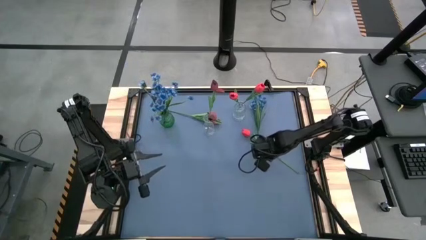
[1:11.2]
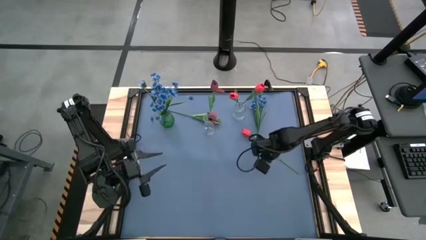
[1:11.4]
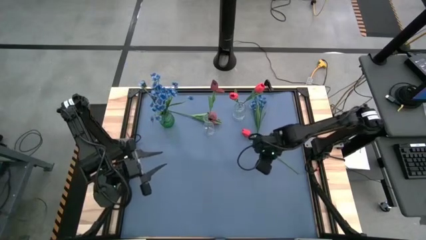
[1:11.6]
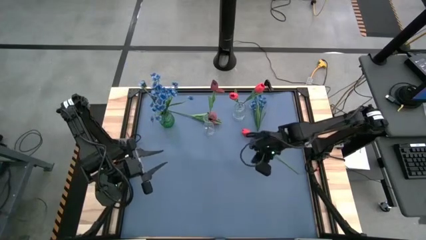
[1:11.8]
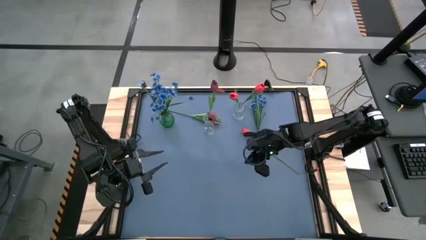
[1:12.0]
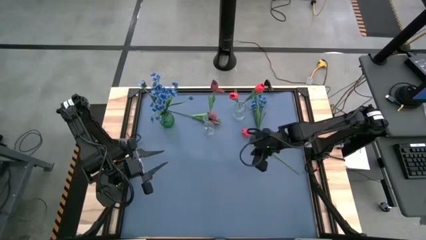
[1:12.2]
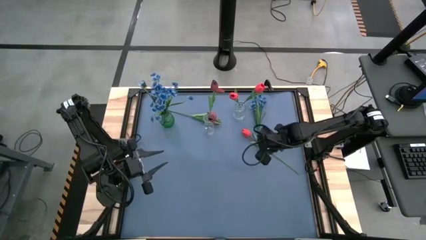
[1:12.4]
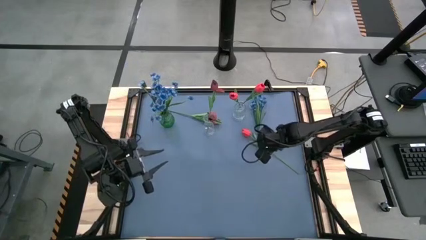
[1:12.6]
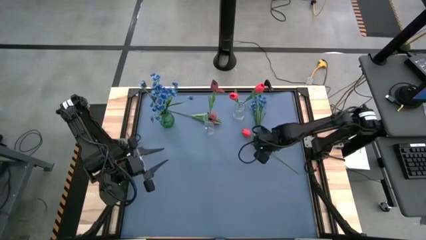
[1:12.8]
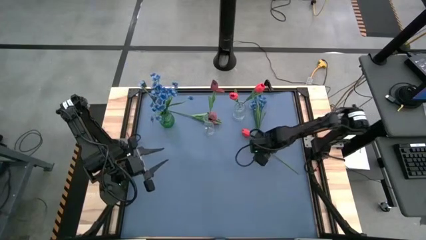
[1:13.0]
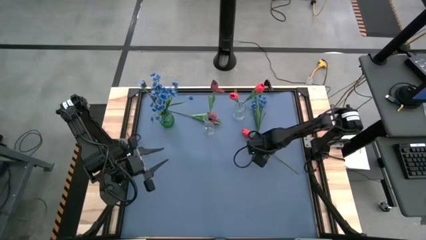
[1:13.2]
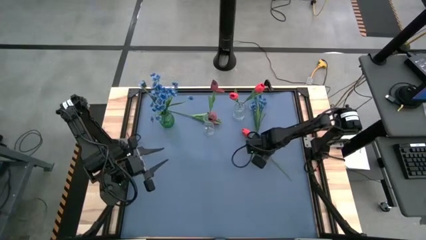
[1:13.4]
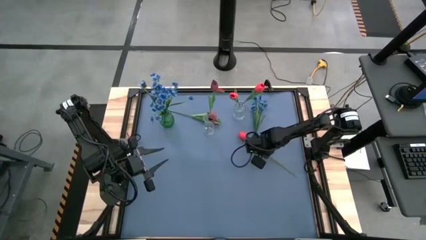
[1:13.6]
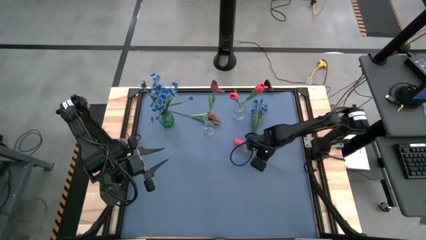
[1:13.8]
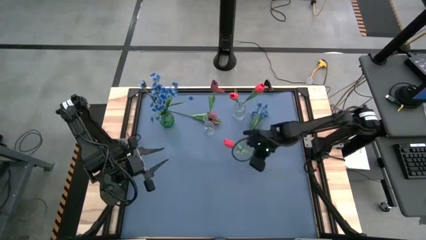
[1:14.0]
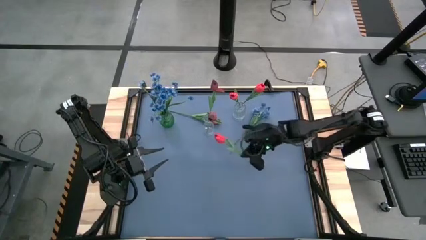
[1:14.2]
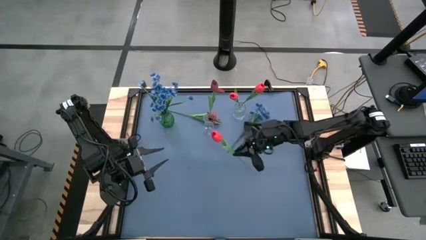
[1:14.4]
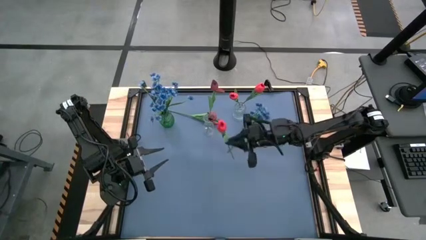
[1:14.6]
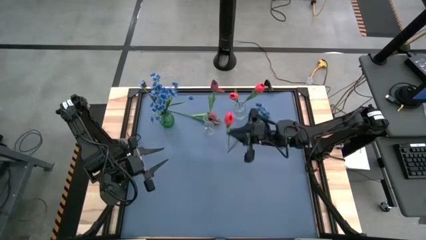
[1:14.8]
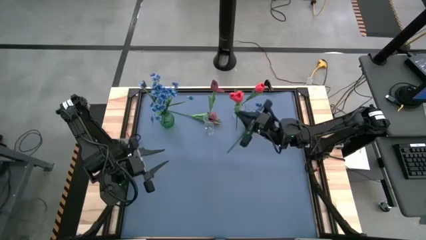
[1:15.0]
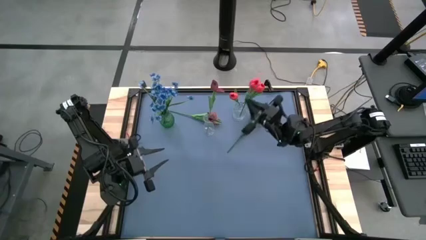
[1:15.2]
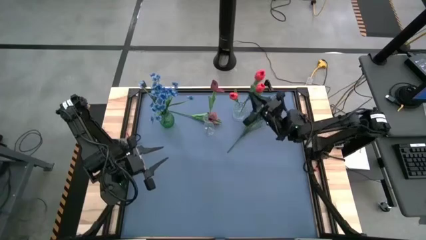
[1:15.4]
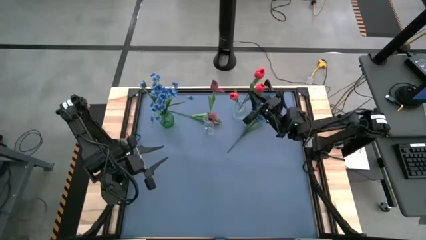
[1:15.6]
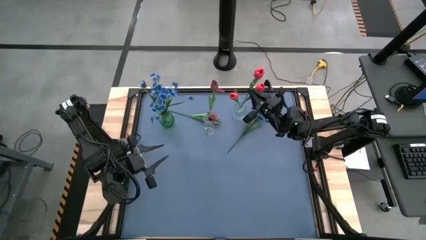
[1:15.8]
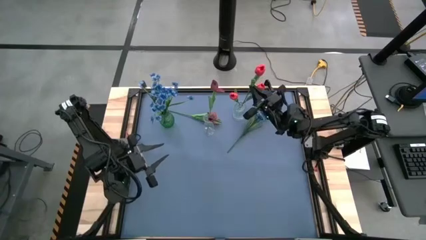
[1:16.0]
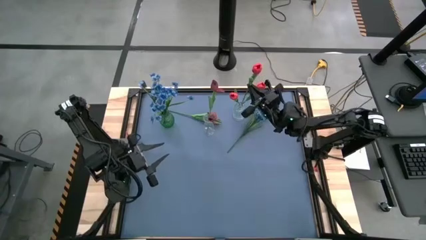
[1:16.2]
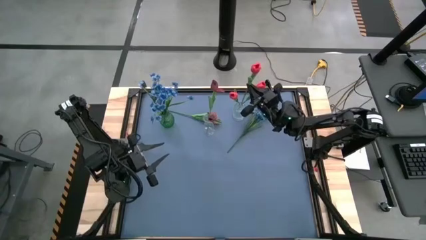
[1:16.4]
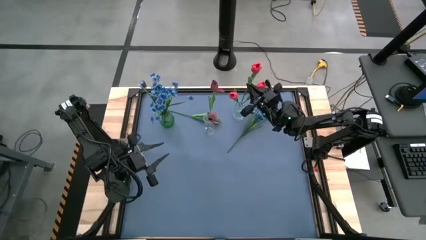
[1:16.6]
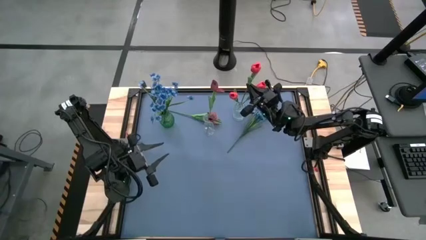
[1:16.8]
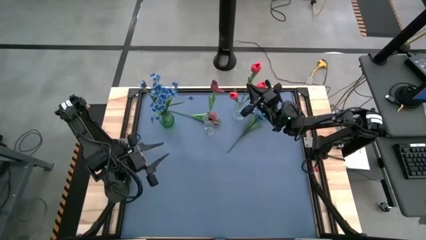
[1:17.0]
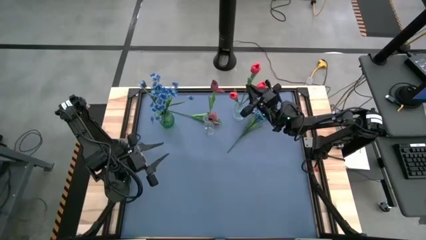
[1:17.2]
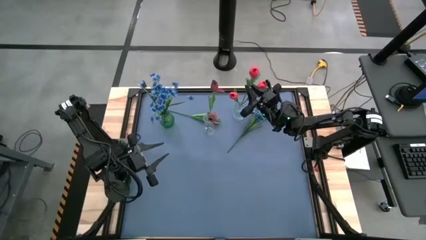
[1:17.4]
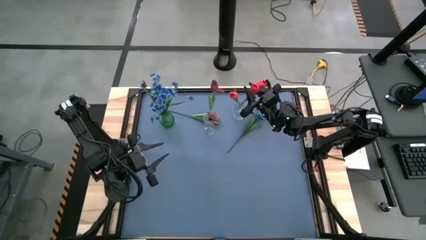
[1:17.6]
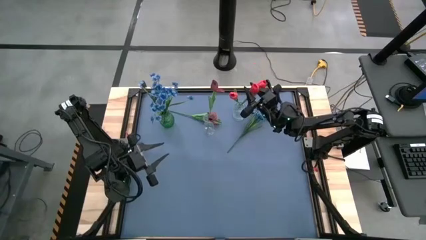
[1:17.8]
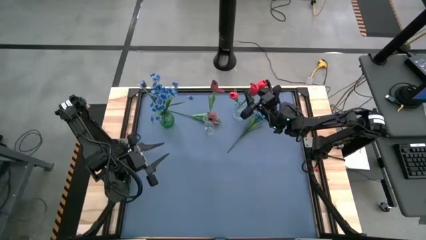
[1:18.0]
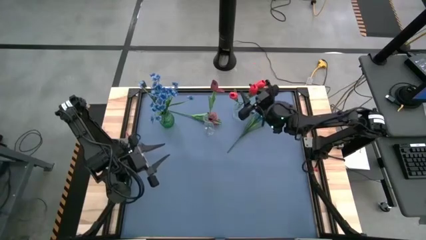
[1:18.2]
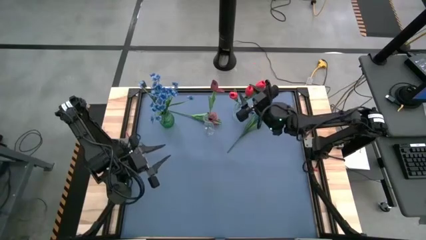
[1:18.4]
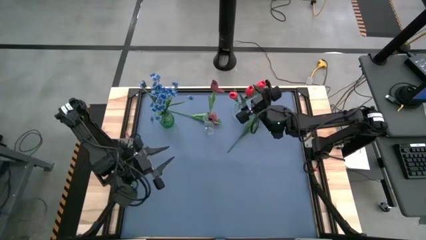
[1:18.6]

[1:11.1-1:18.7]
Task: Sort flowers into vase by color
Put the red tulip into the top transparent vase

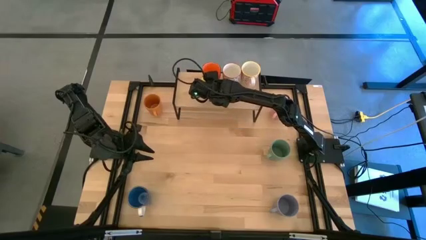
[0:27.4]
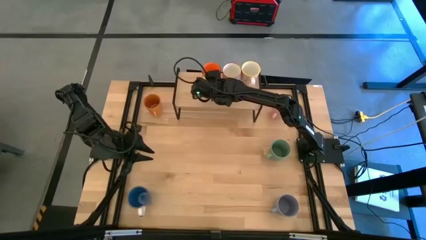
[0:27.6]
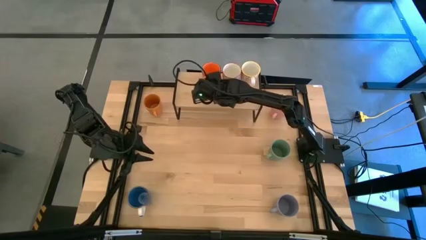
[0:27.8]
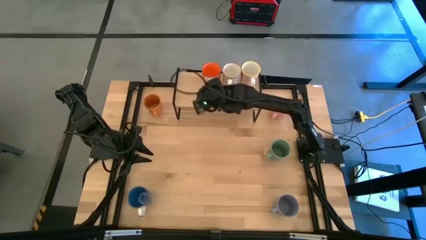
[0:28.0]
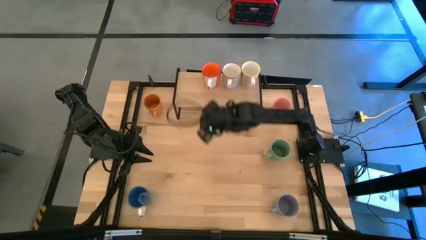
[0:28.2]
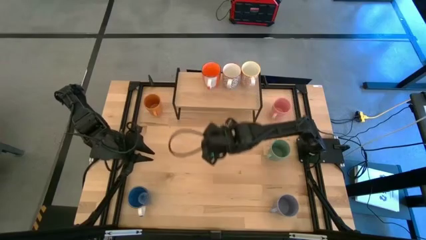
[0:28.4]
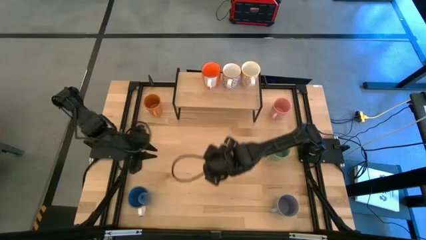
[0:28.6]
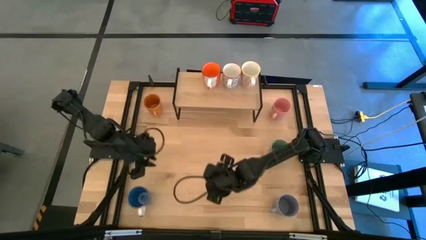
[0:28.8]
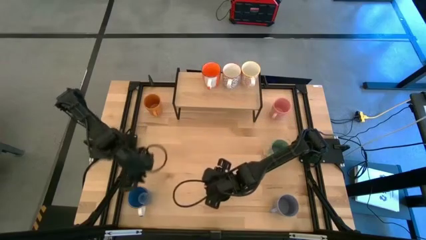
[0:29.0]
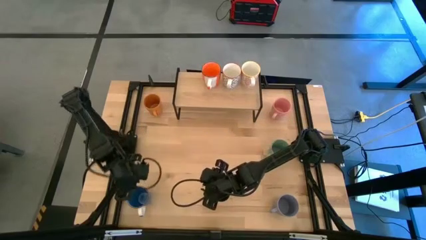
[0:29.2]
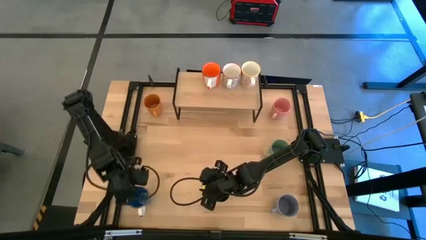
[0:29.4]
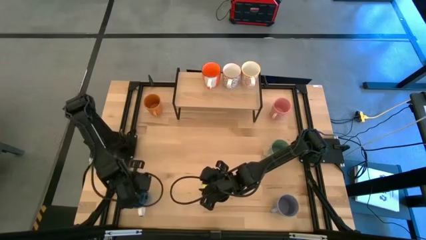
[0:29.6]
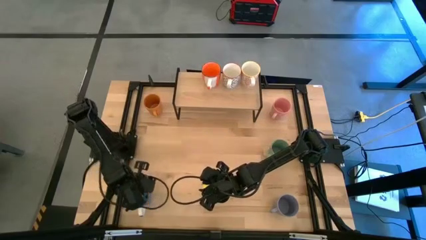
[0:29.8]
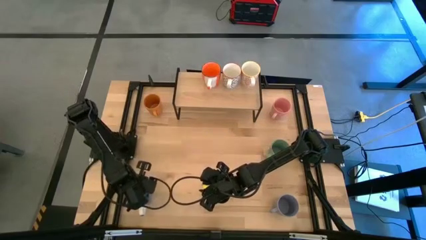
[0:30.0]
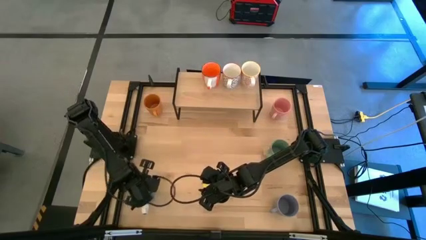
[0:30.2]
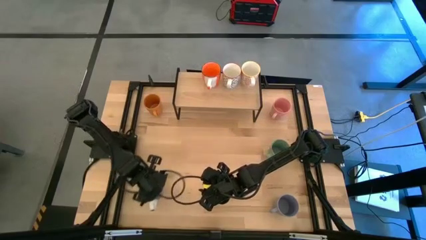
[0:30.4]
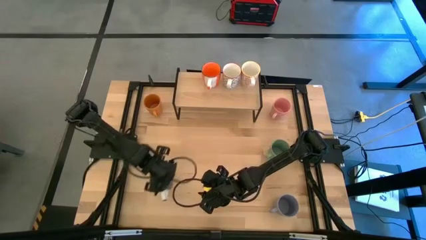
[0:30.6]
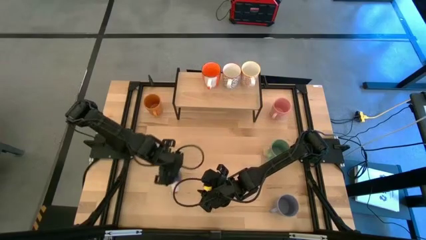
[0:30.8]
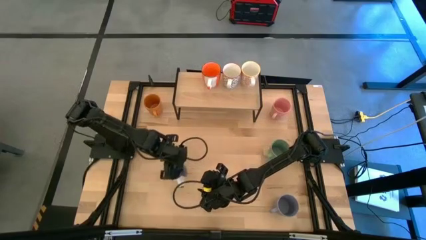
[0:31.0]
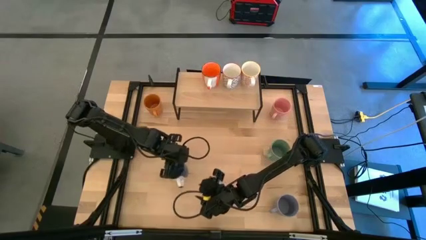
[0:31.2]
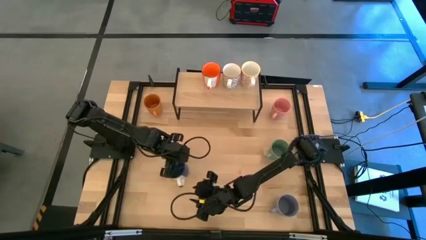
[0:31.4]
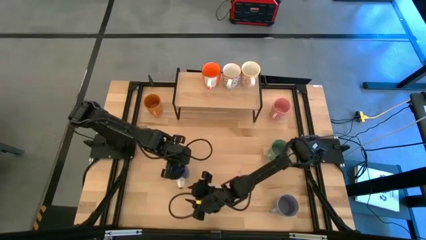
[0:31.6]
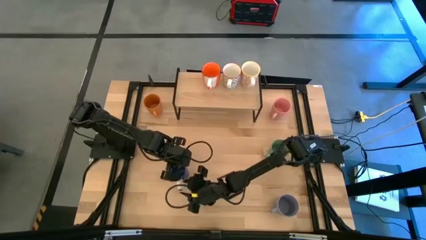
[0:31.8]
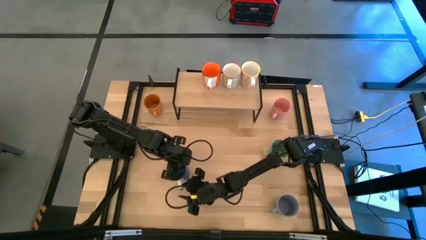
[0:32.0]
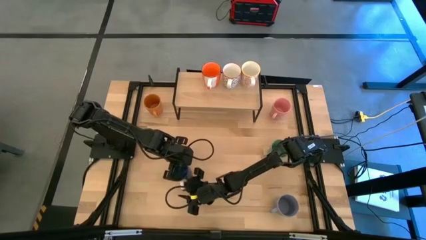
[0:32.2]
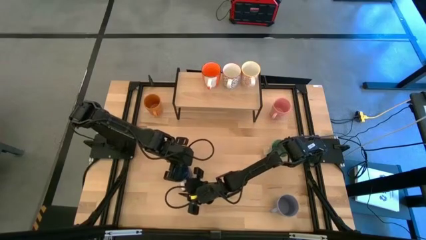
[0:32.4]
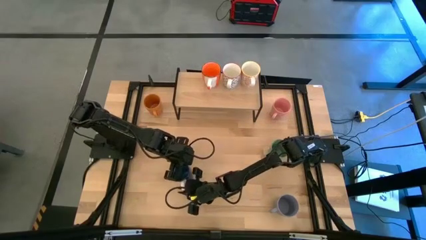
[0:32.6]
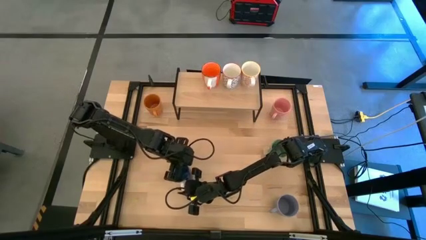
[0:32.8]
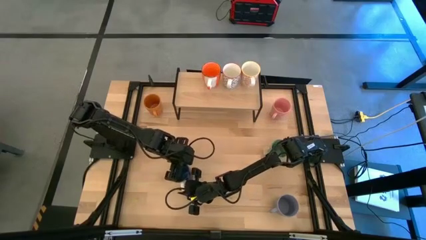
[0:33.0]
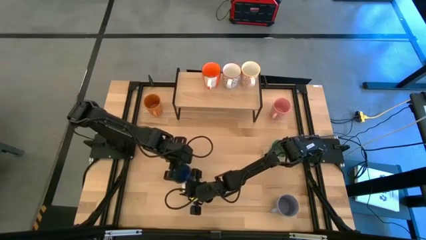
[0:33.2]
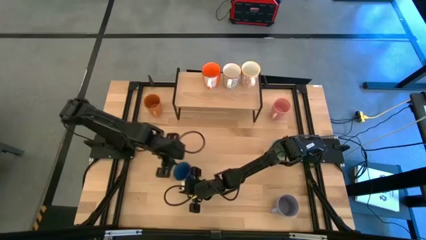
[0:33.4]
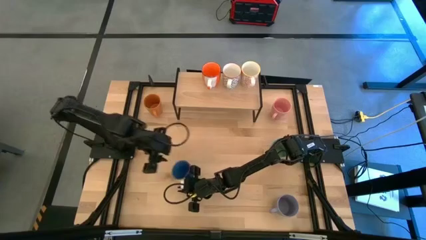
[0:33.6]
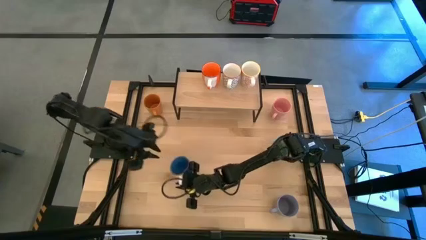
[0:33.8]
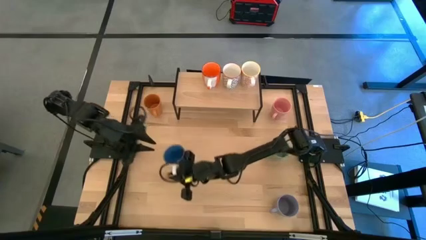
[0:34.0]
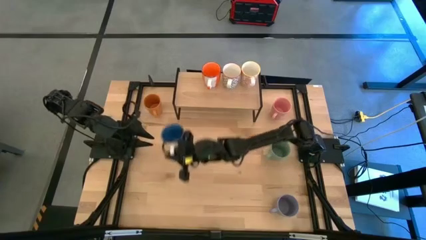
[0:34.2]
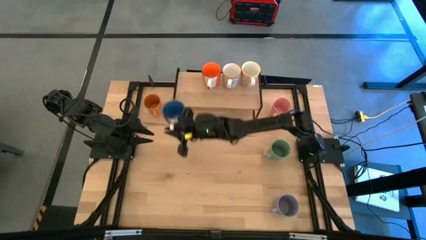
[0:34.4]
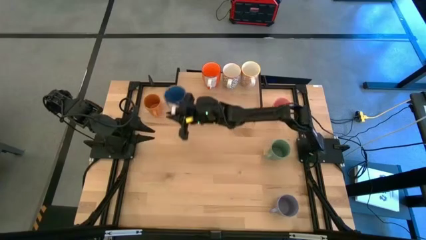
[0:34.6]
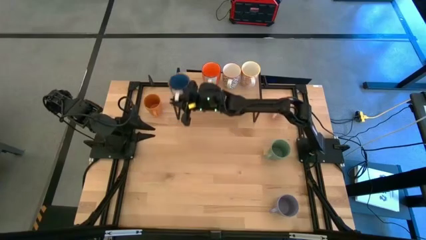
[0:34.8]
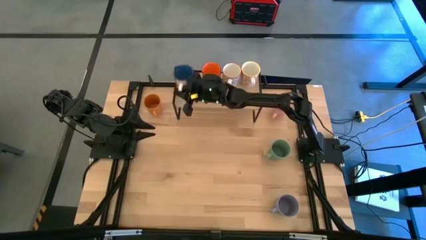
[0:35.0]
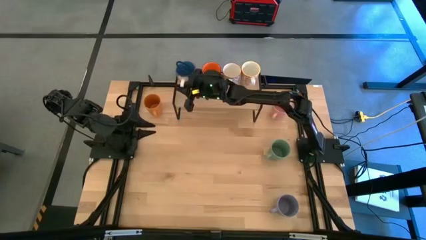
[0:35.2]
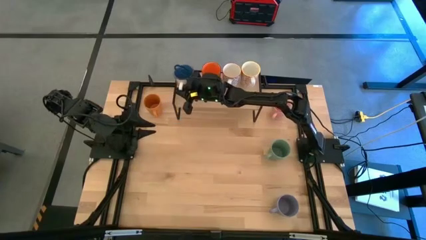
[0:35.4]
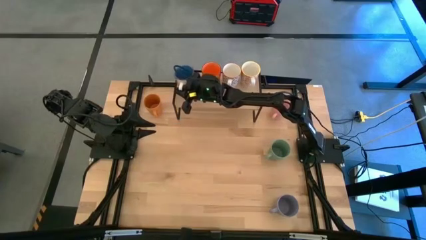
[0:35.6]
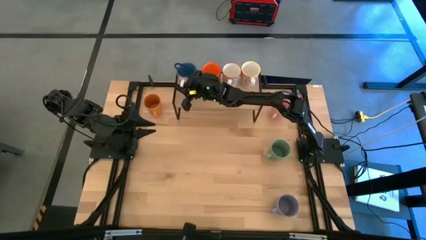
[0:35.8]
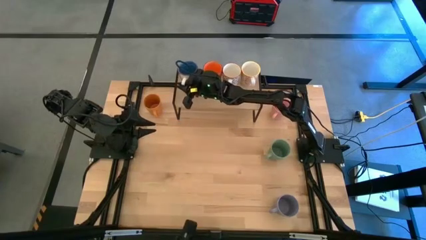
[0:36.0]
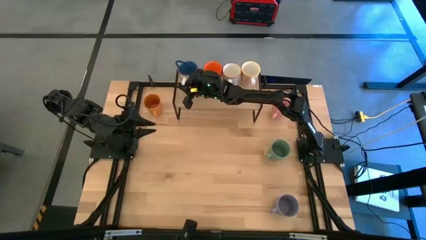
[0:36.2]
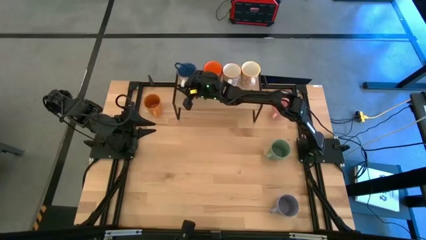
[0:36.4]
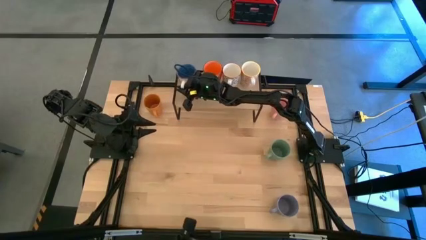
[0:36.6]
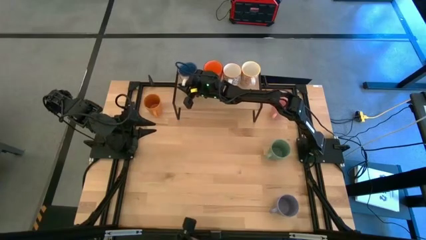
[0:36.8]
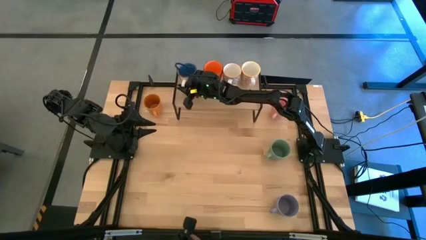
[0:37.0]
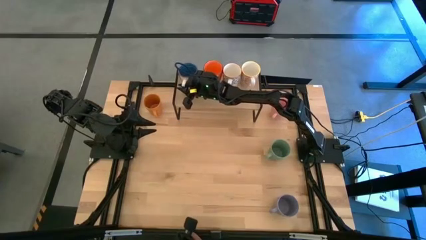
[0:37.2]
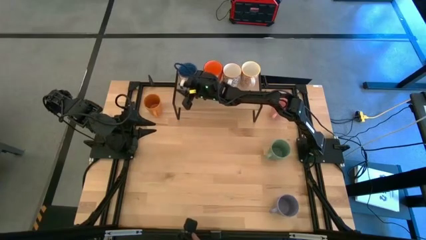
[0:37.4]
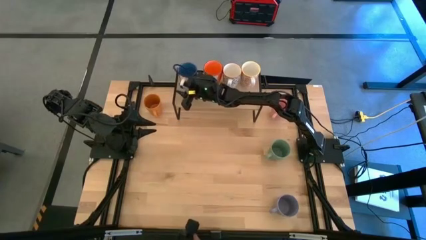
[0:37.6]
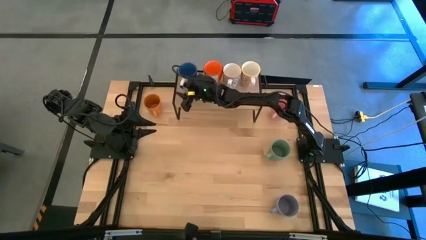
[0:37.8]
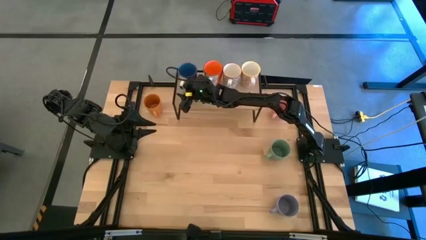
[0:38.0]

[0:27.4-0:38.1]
Task: Place coffee mugs
Put the blue mug on the shelf
